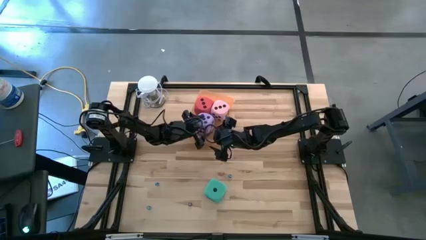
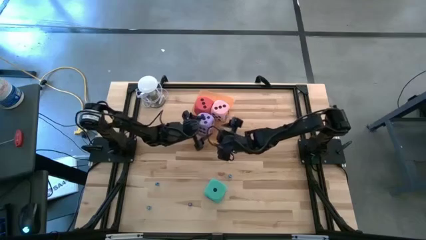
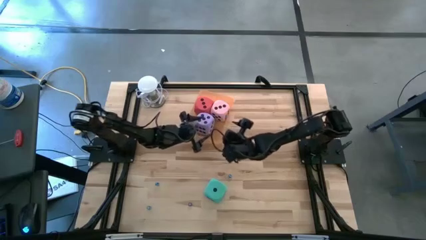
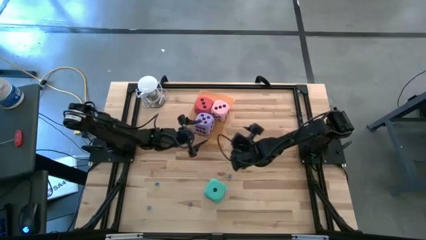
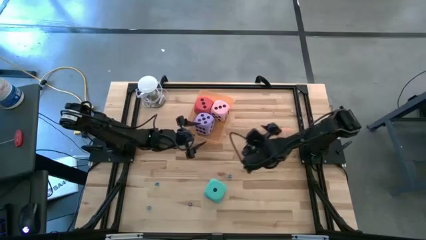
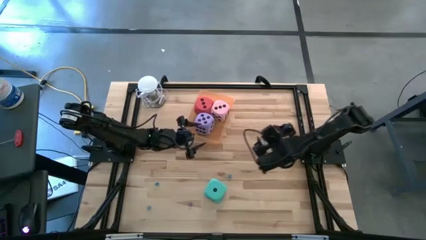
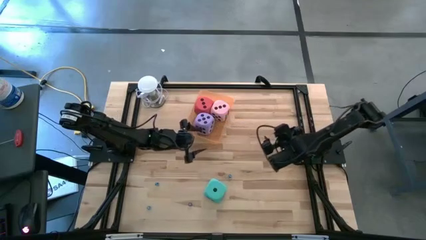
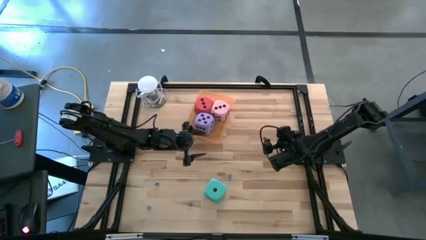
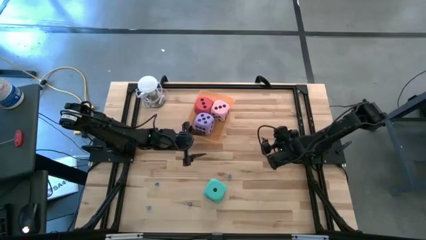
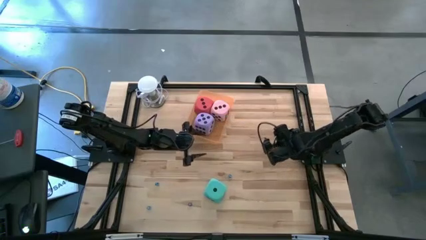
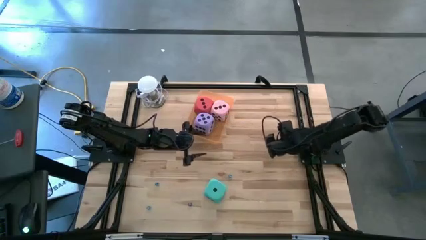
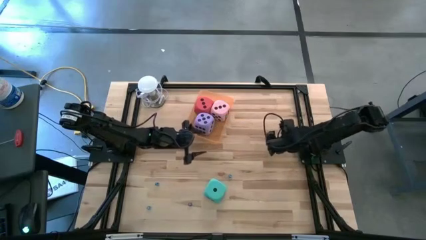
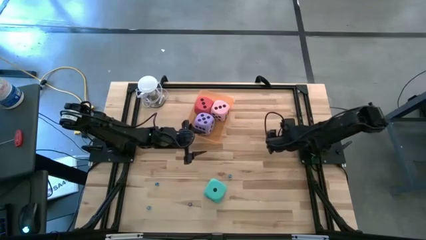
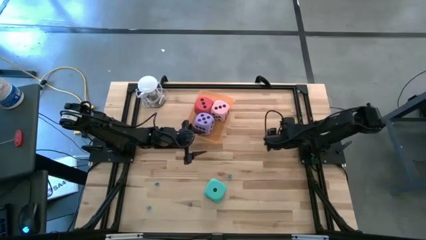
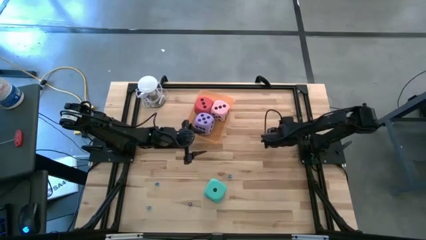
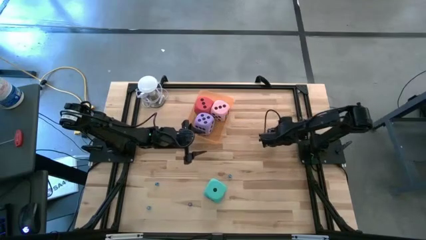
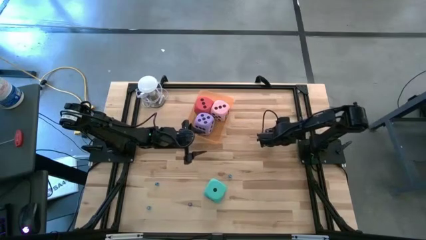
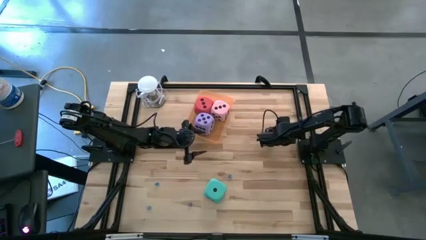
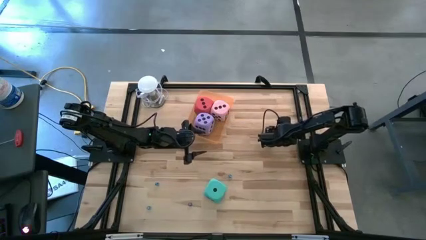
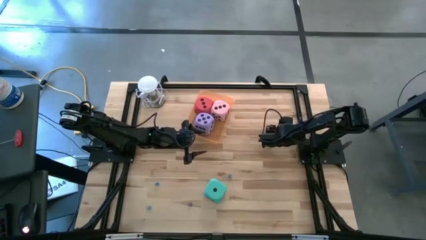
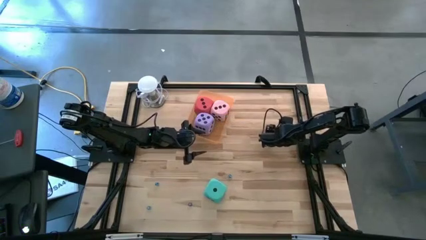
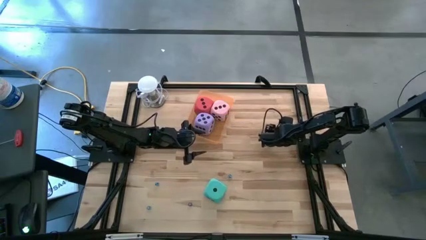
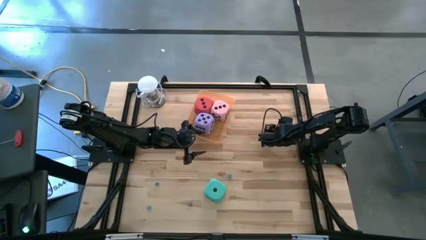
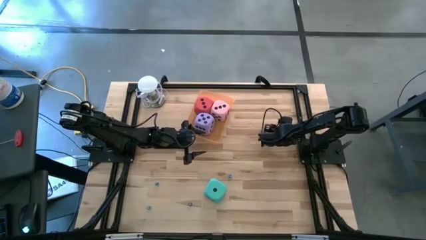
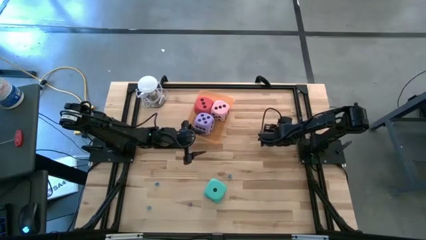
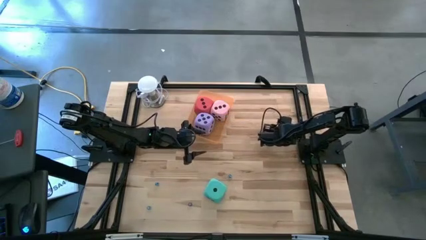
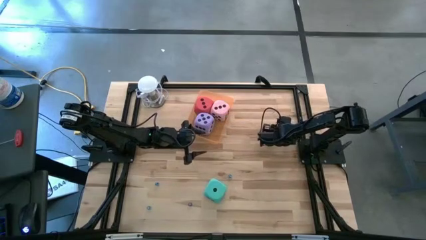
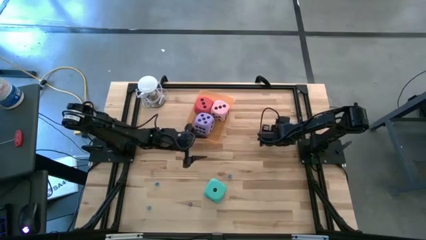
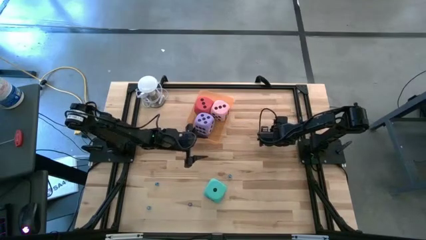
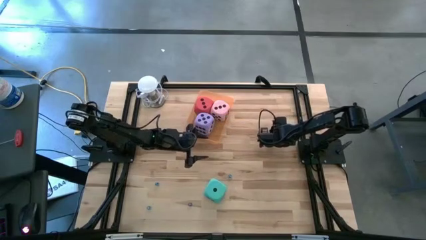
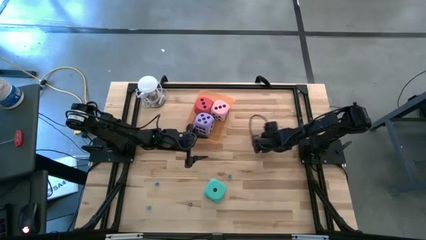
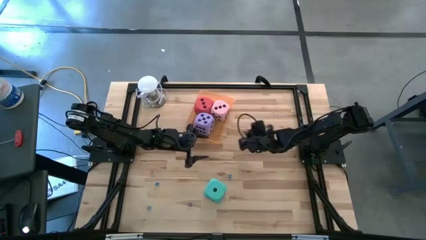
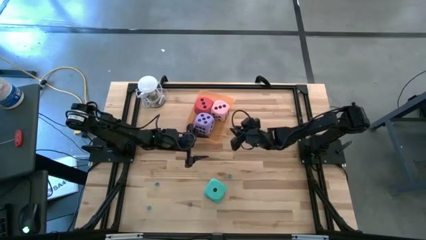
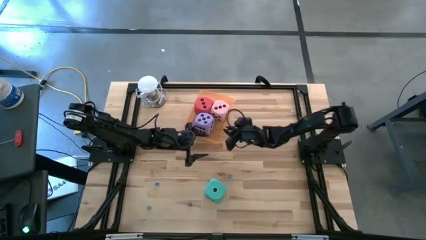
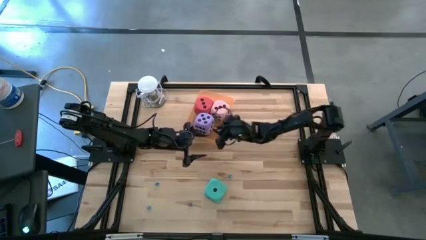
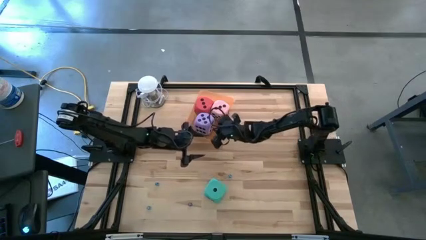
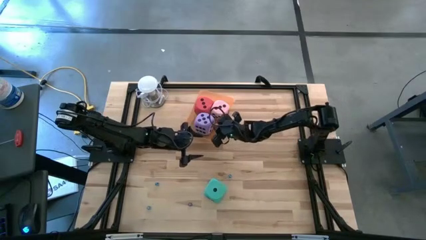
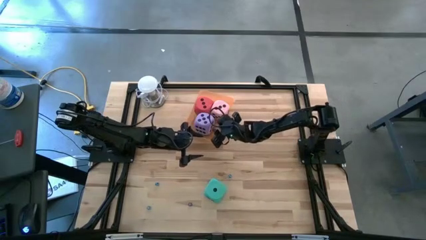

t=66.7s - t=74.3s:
Task: Pick & Place Dice
Put the small orange die into the orange bin

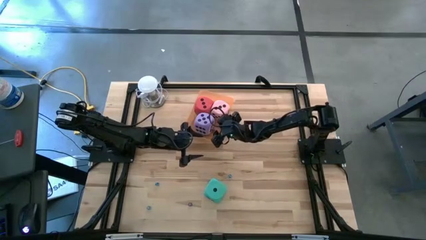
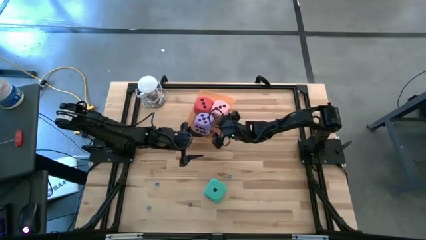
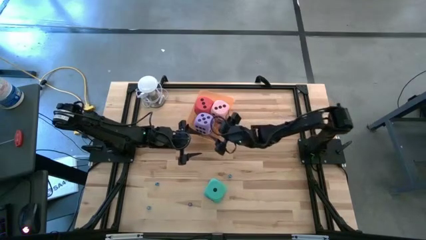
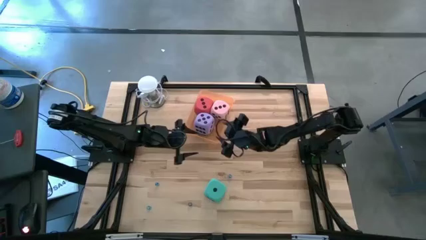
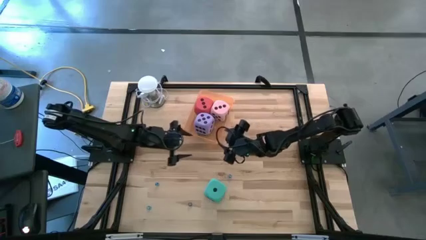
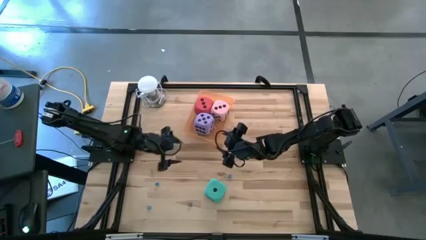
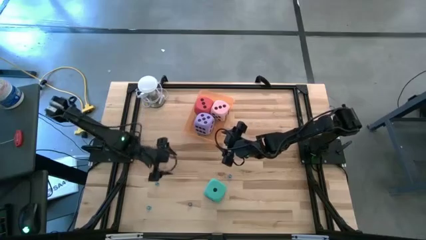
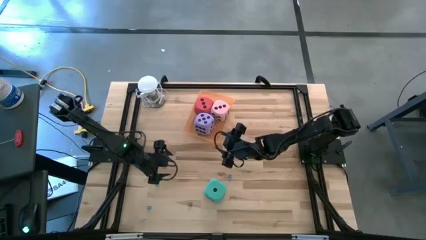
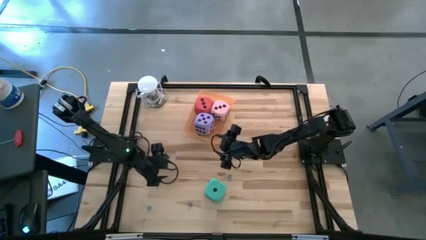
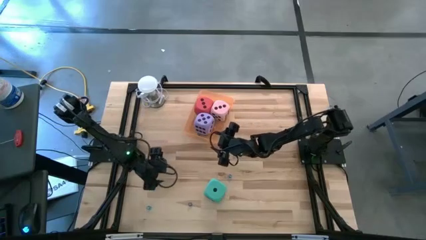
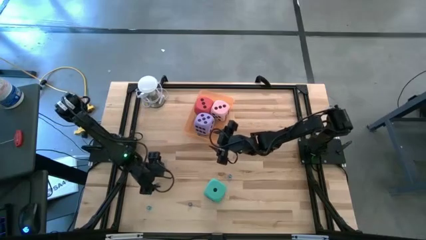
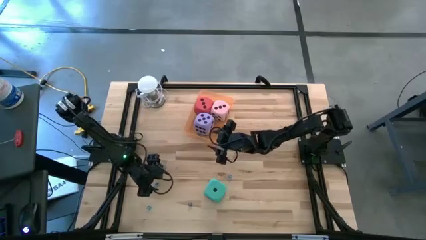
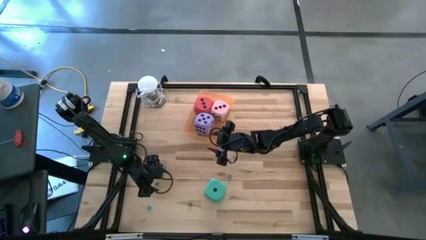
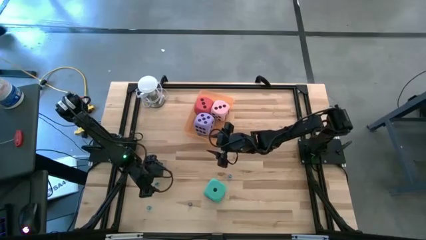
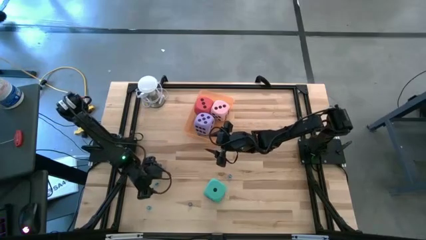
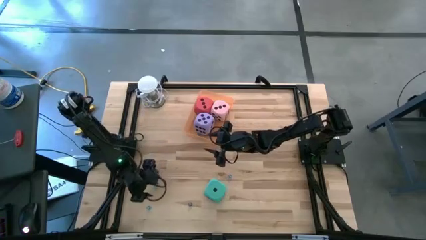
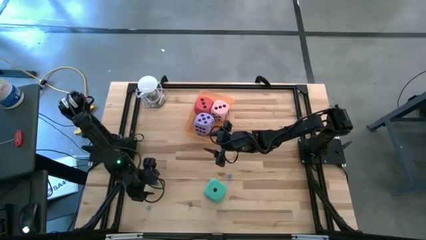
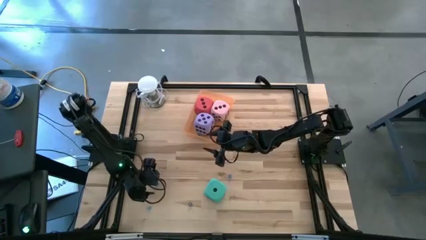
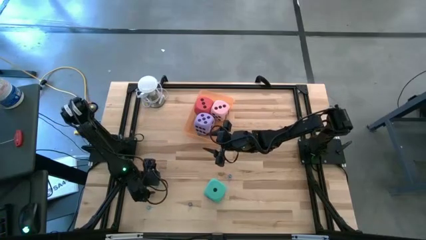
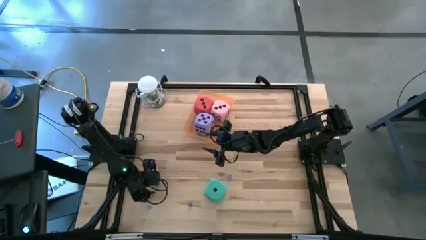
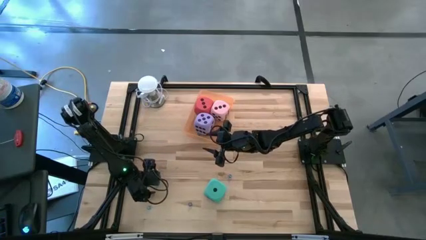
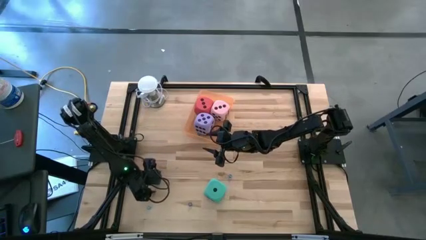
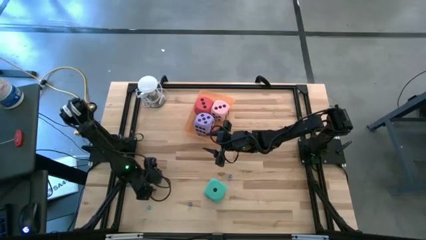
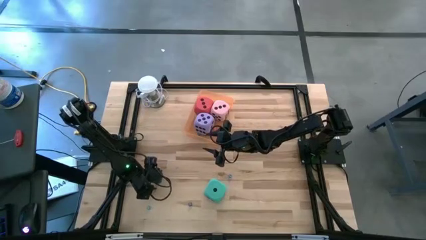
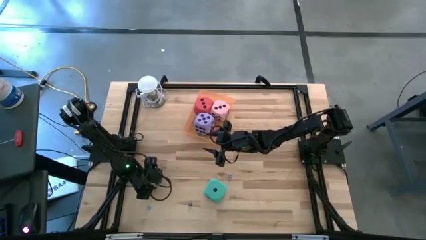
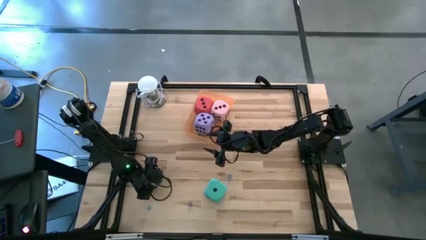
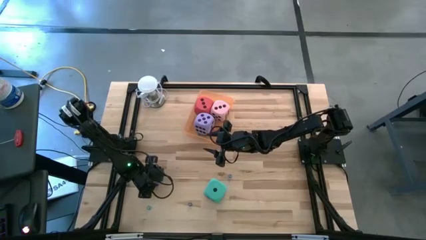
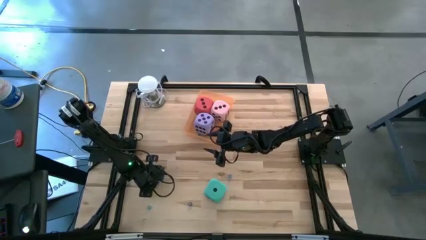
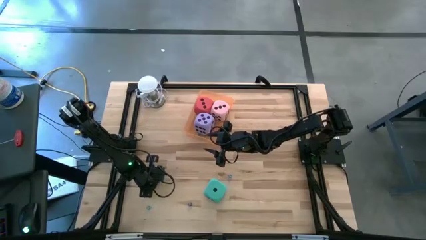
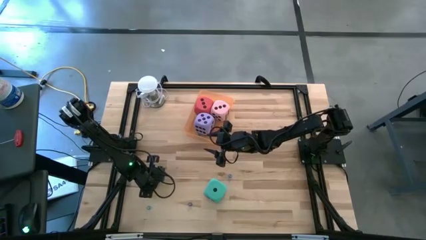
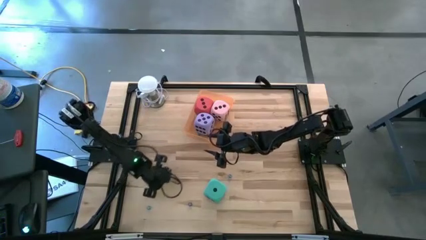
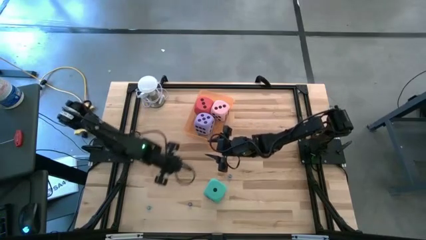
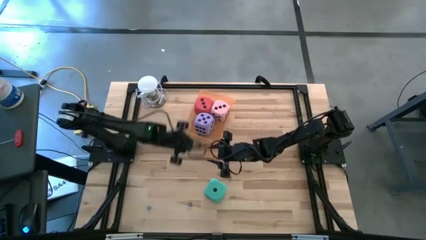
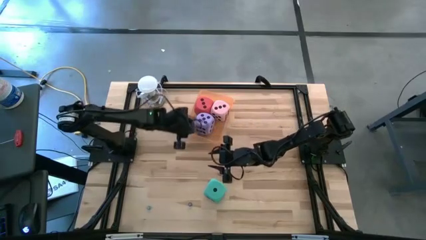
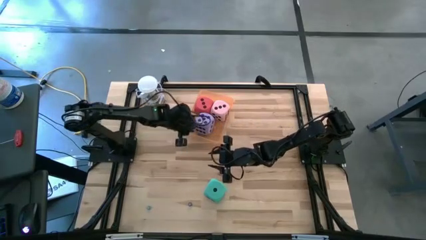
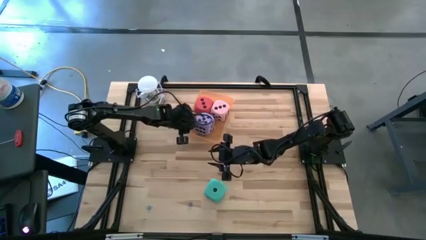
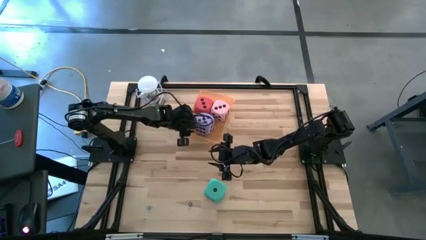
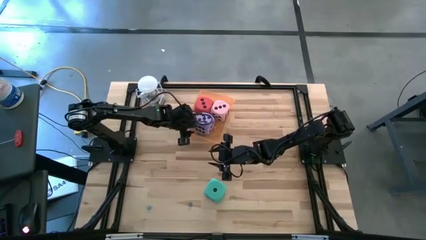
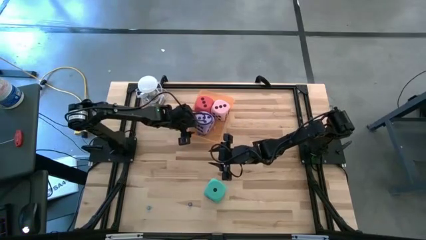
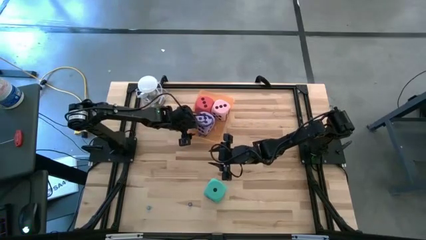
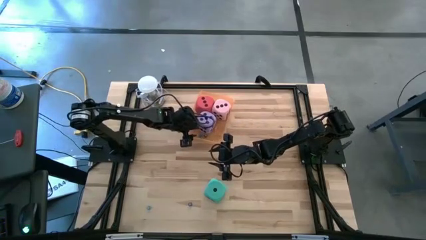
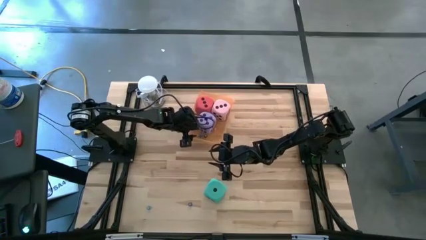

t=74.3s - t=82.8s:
Put the small blue die into the orange bin
